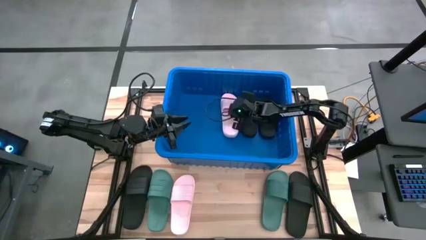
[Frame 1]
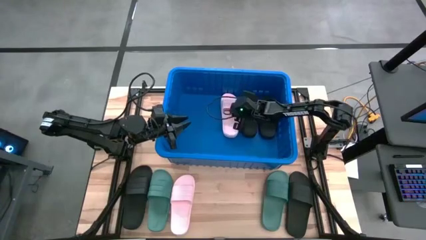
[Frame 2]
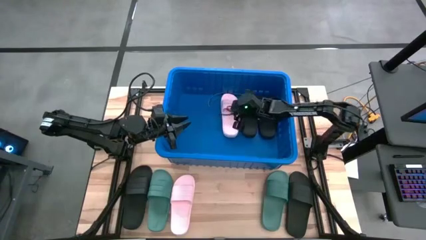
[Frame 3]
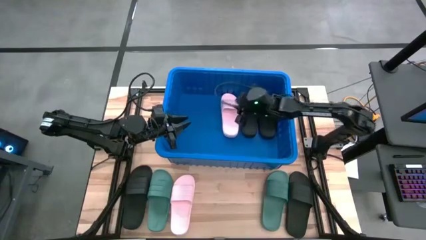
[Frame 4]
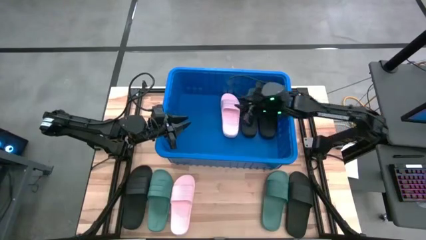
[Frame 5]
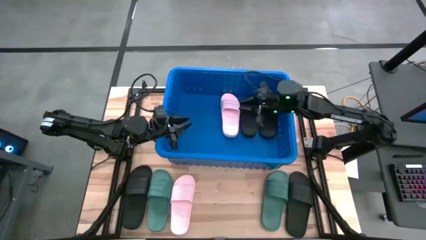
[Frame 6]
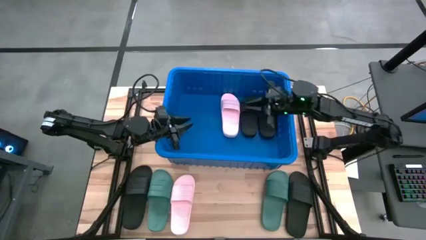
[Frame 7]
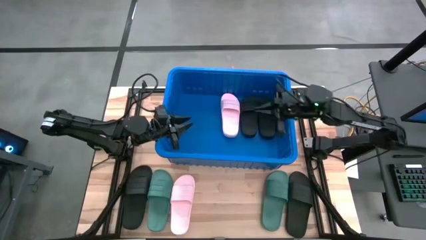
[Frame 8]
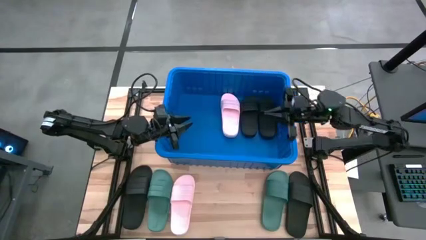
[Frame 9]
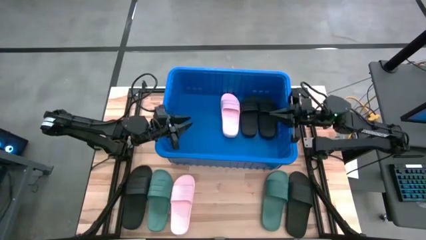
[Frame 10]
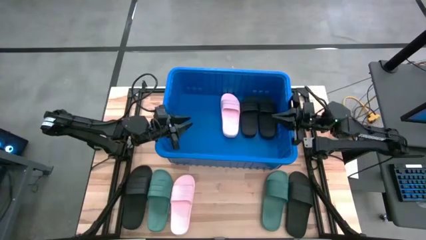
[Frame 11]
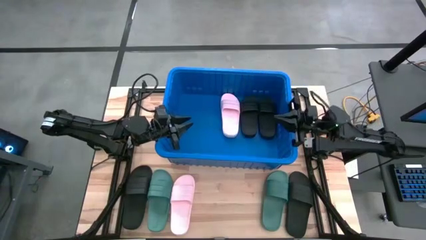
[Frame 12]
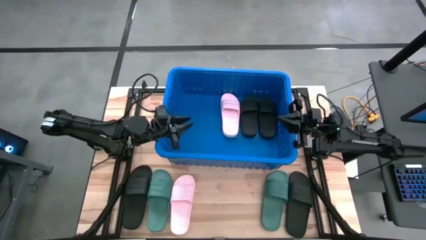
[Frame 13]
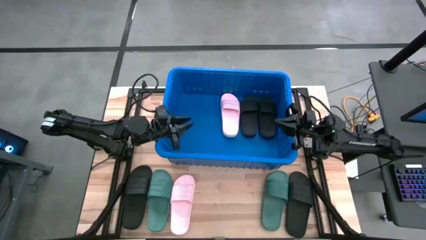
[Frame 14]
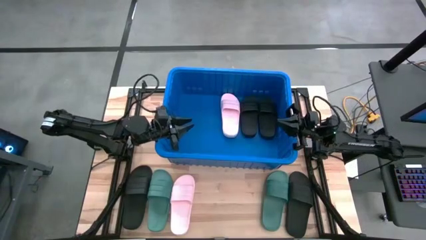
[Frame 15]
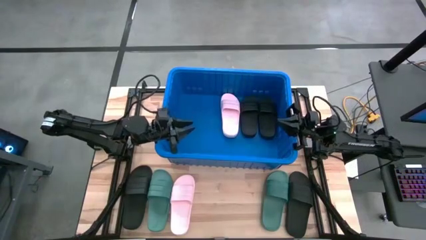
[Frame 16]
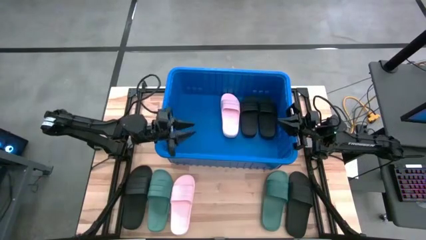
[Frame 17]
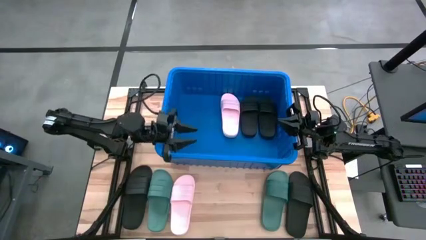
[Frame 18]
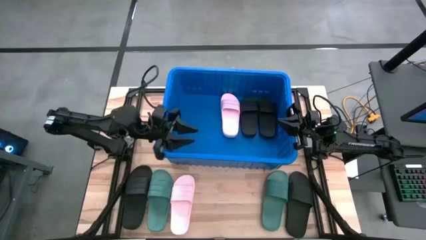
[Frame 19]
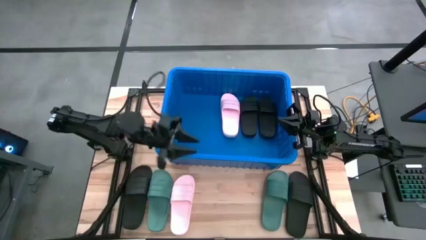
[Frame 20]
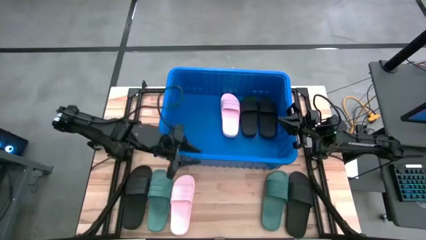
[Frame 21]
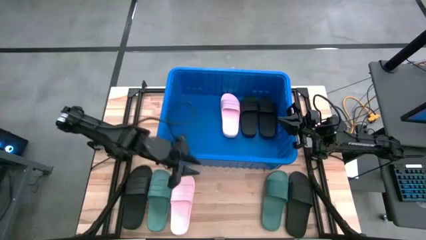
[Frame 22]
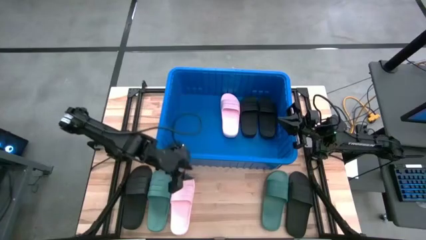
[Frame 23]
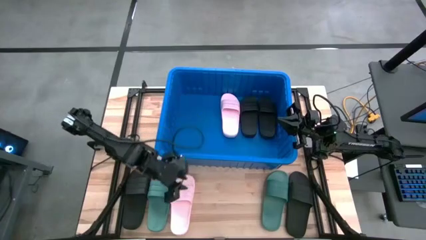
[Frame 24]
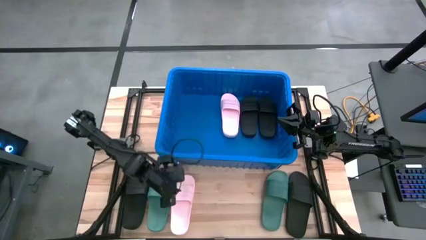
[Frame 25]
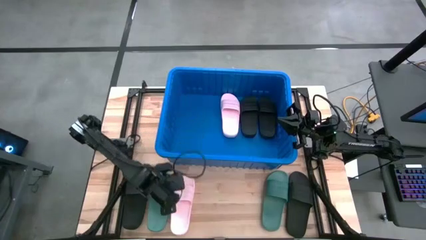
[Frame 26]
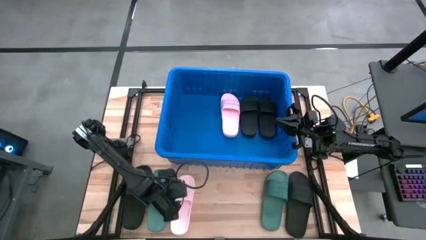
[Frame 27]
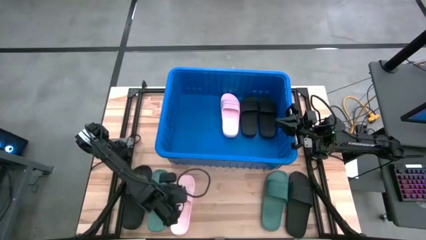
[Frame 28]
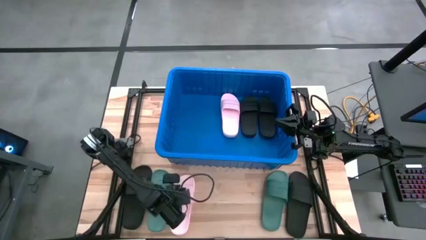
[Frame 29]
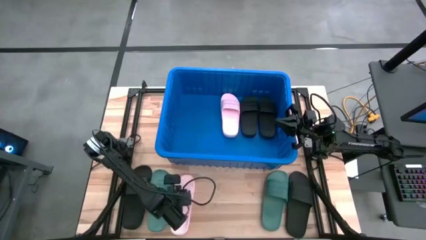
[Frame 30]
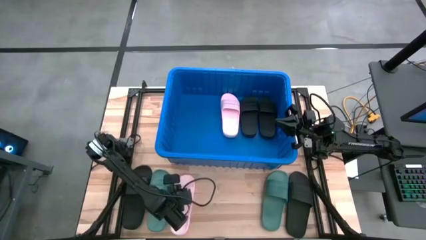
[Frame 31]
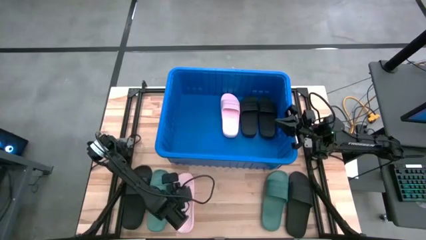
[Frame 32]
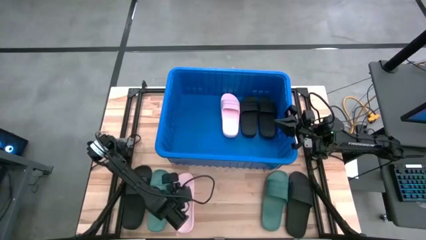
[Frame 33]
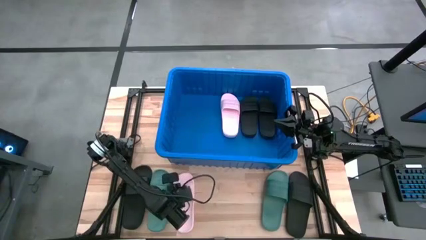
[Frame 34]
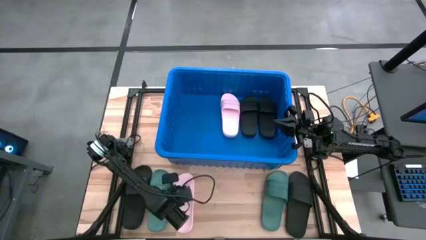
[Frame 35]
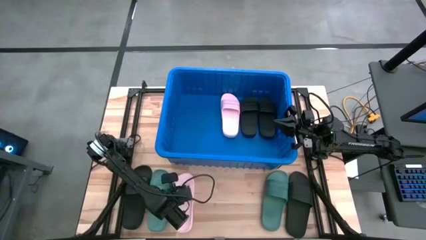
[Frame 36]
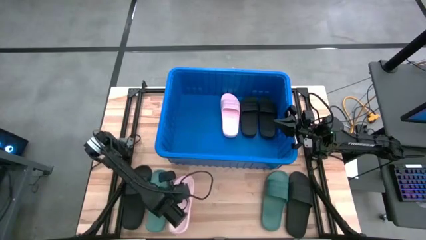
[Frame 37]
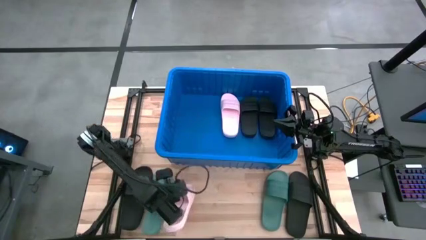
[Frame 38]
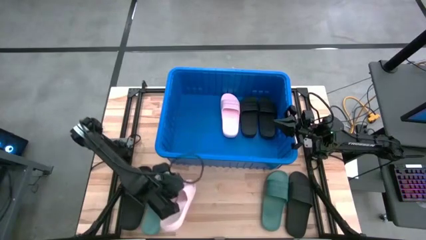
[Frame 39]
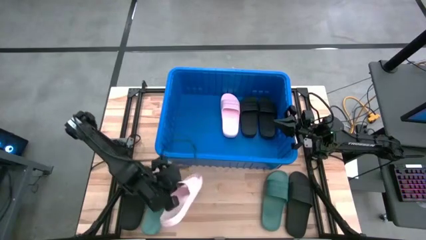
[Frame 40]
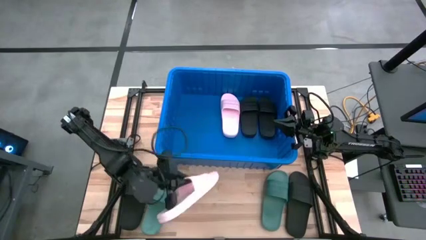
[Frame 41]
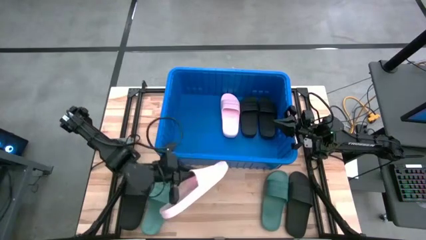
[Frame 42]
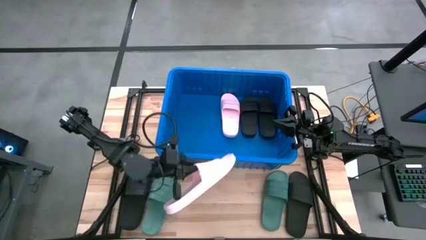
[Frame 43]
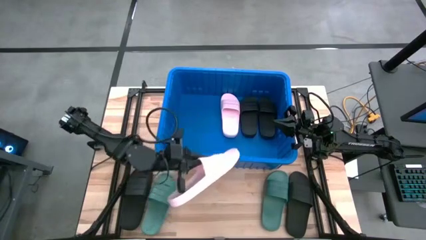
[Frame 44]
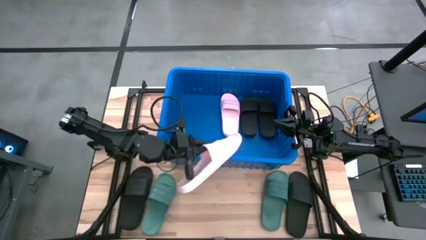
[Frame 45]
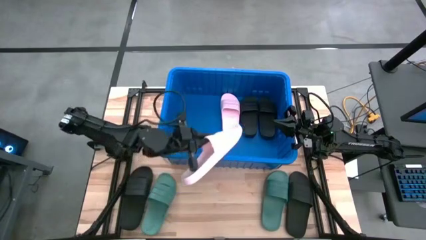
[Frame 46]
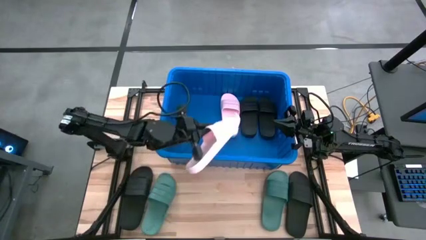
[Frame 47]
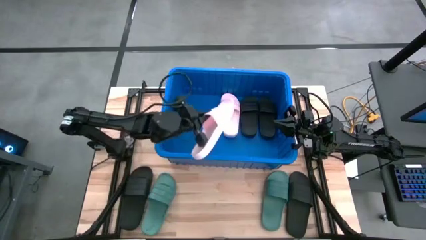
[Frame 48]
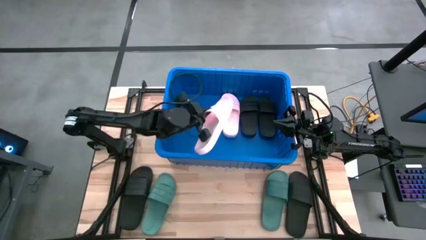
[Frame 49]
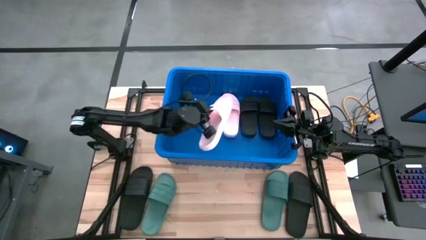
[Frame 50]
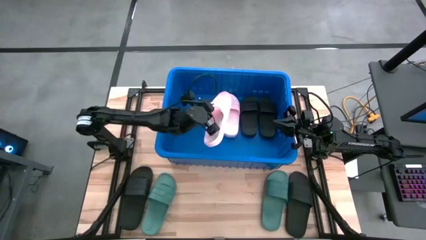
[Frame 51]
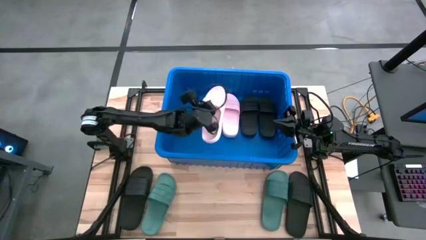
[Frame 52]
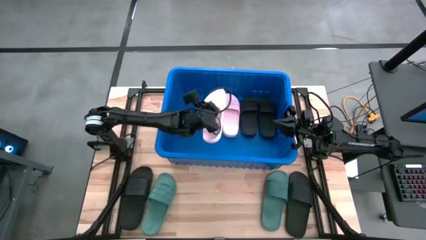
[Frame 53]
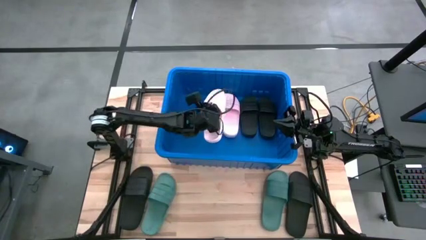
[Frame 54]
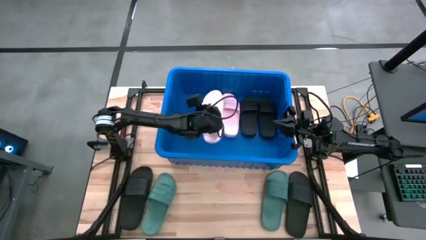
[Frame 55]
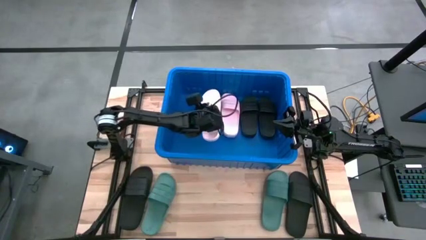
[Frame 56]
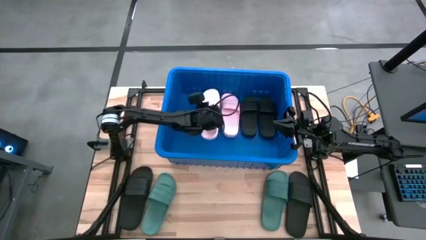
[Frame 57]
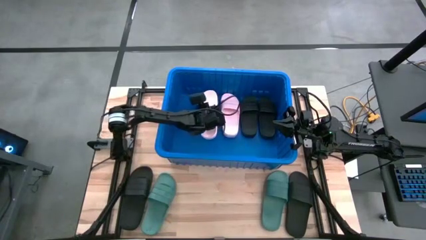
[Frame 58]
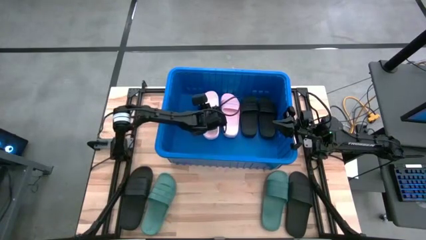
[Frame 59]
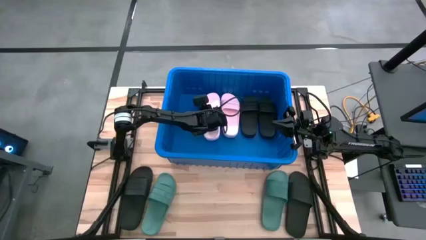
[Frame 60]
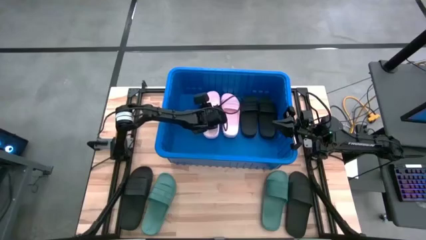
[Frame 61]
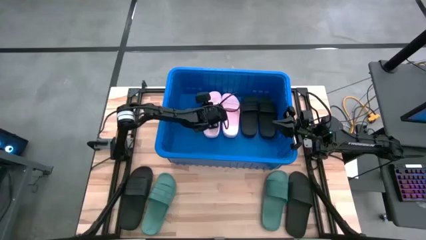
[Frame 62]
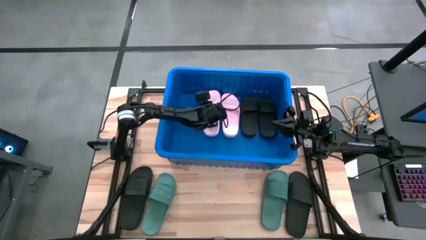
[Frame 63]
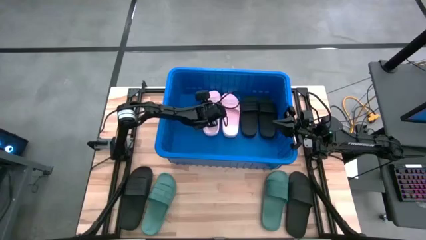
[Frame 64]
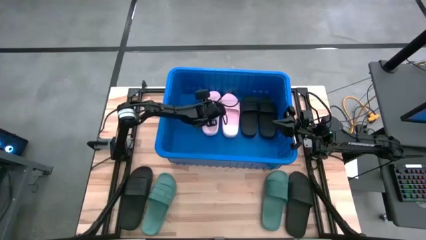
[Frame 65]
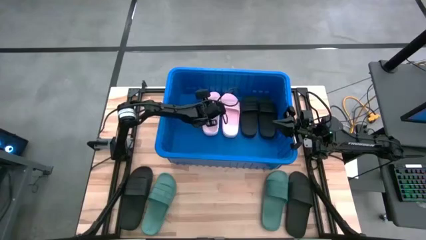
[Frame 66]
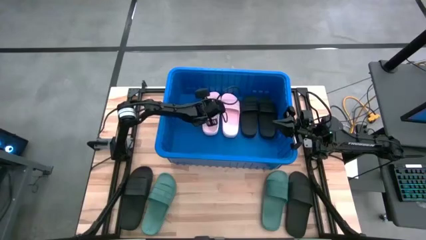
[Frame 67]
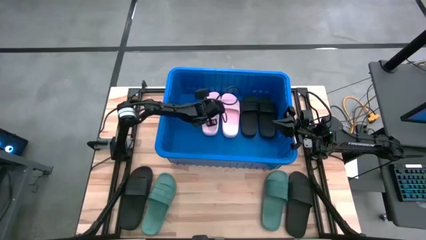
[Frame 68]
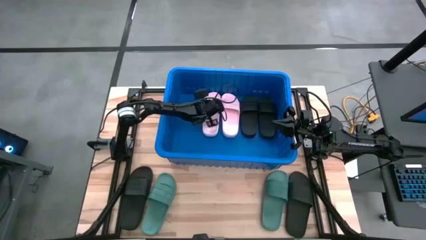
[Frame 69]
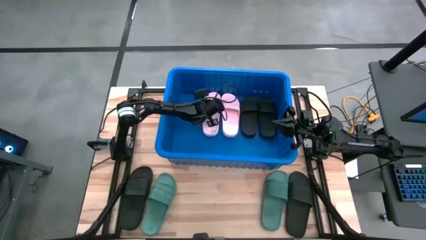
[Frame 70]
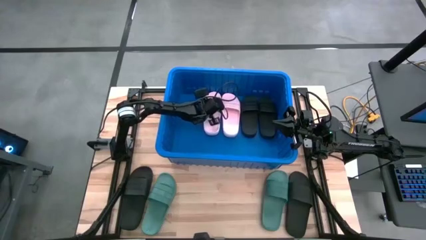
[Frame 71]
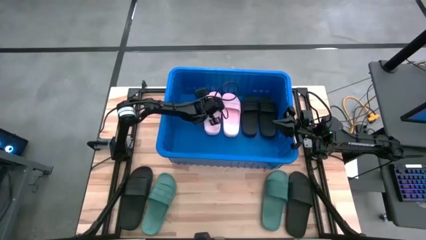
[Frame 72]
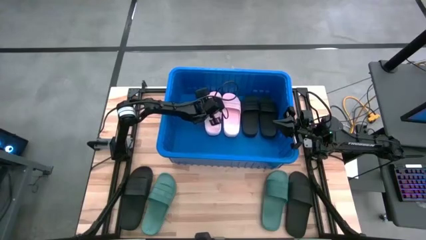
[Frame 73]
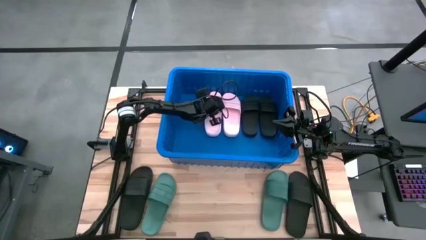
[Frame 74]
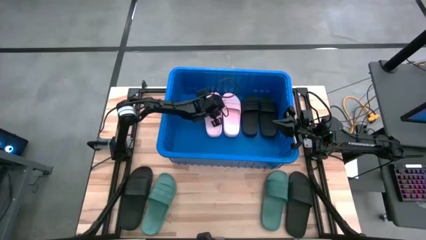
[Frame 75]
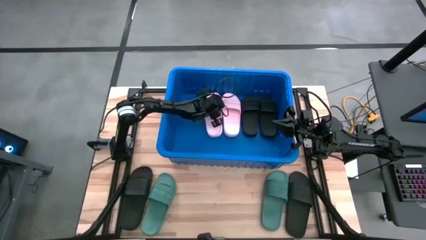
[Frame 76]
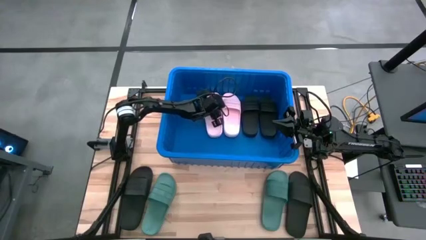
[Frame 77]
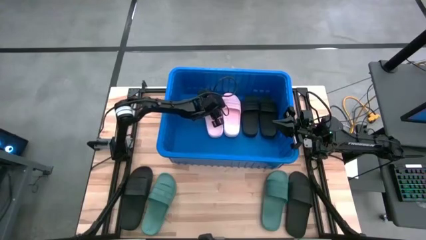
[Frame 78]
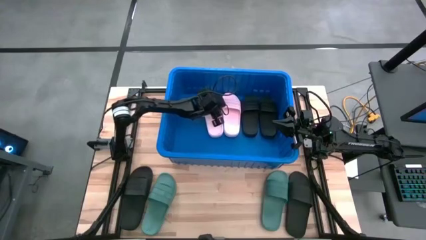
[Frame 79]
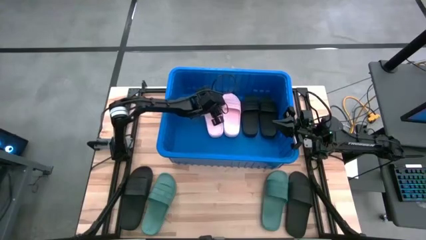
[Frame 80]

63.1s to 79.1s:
Task: Pick and place slides into bin
Put the left pink slide into the blue bin
